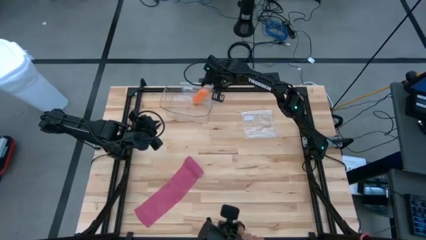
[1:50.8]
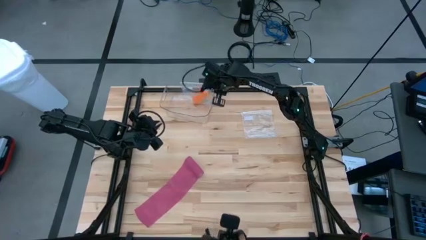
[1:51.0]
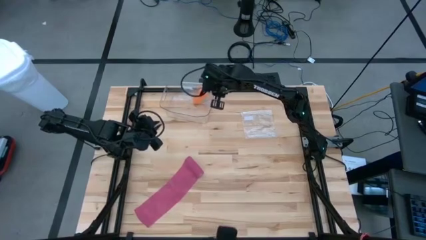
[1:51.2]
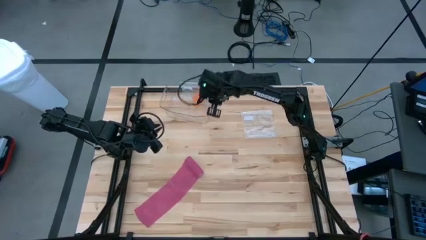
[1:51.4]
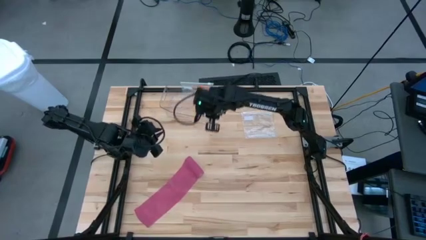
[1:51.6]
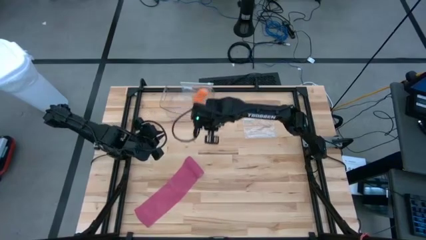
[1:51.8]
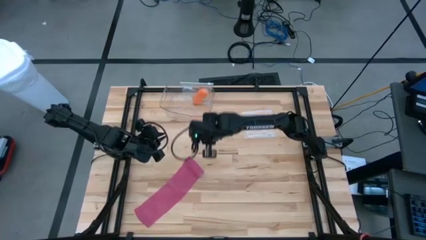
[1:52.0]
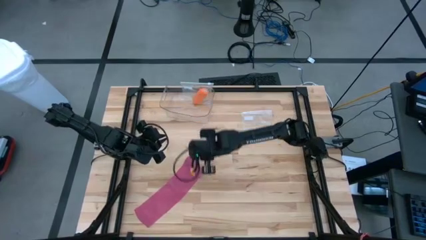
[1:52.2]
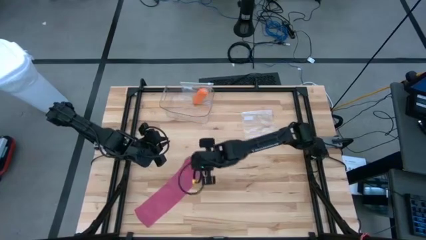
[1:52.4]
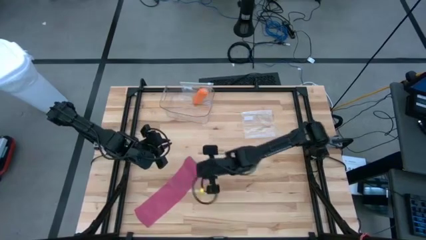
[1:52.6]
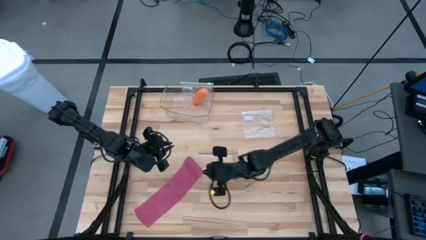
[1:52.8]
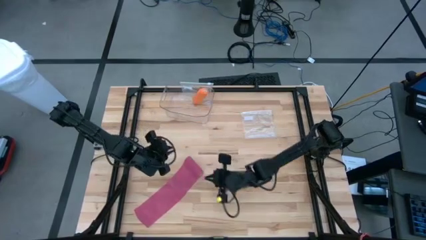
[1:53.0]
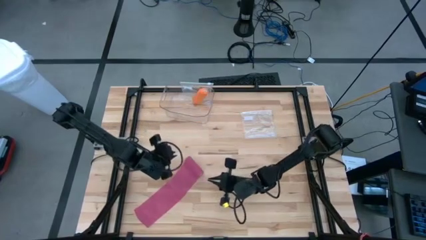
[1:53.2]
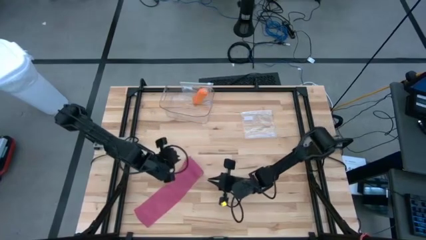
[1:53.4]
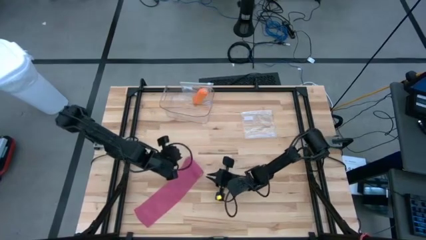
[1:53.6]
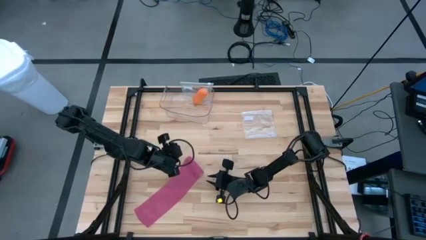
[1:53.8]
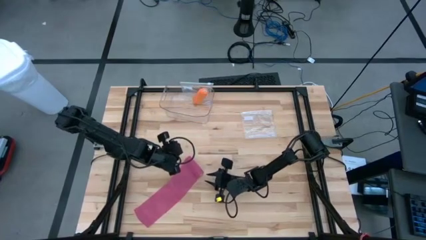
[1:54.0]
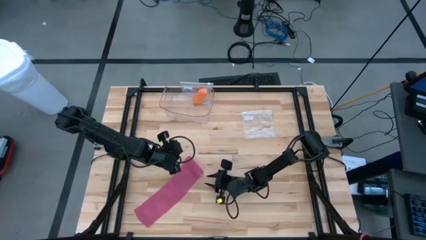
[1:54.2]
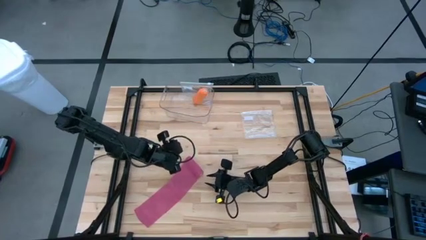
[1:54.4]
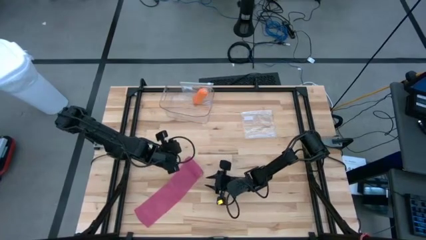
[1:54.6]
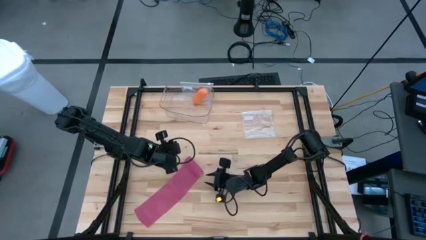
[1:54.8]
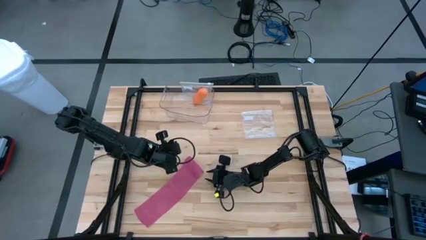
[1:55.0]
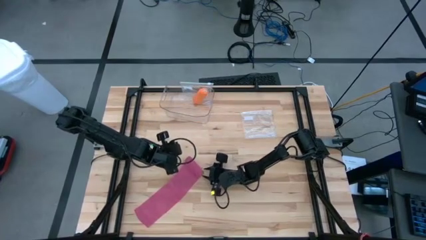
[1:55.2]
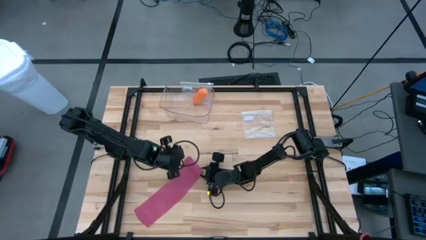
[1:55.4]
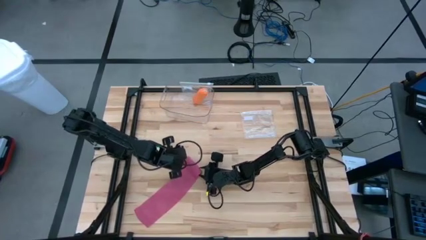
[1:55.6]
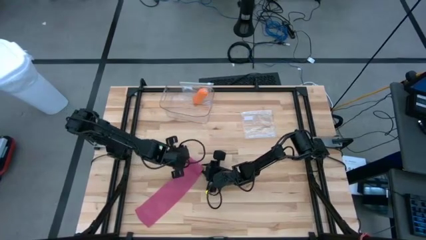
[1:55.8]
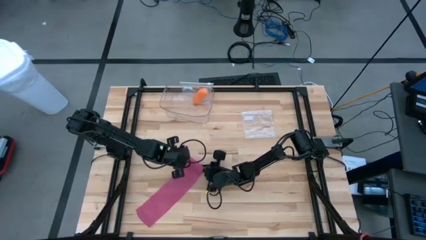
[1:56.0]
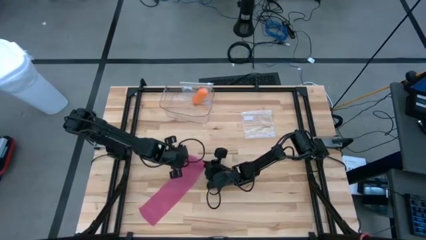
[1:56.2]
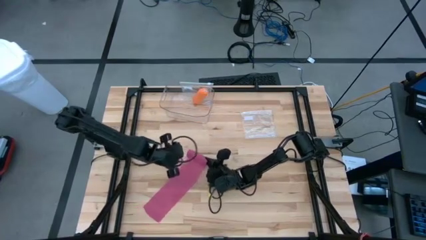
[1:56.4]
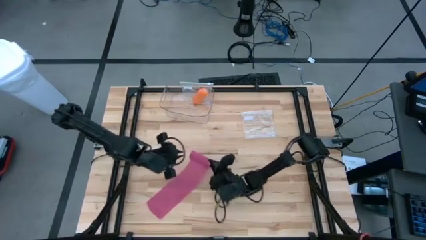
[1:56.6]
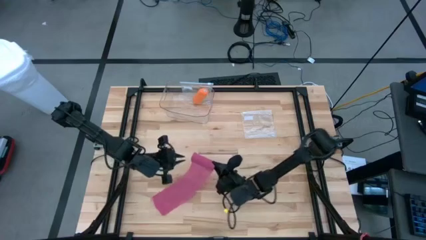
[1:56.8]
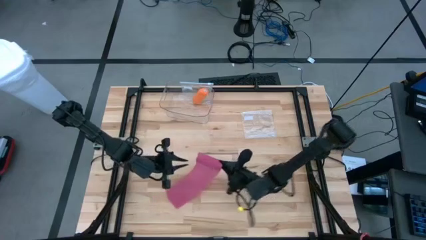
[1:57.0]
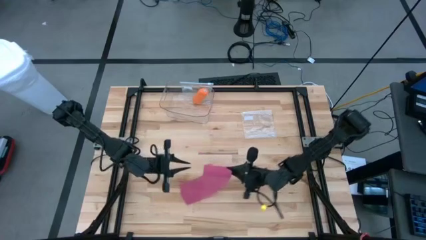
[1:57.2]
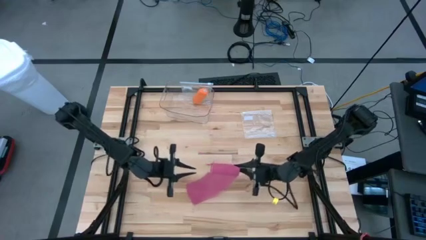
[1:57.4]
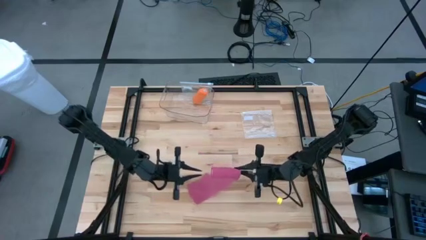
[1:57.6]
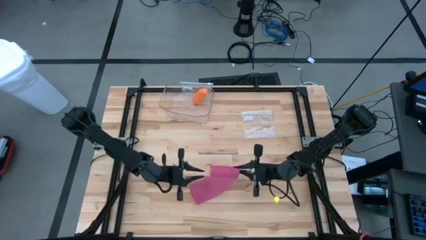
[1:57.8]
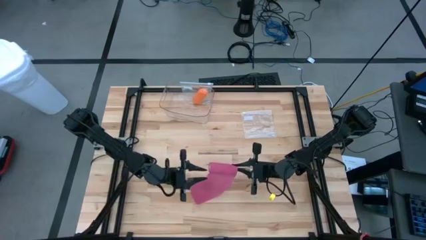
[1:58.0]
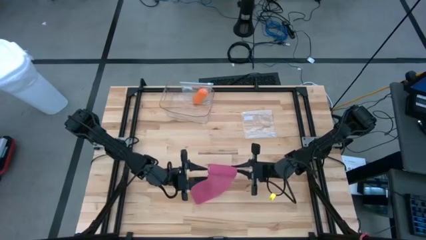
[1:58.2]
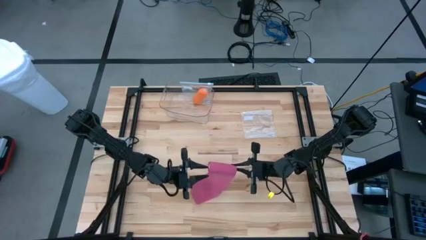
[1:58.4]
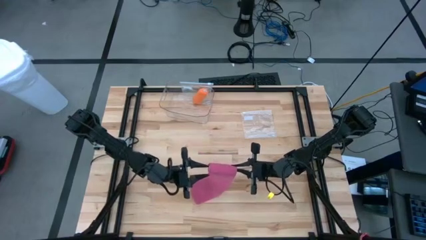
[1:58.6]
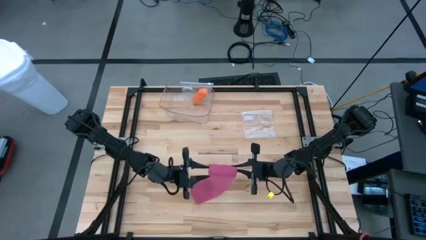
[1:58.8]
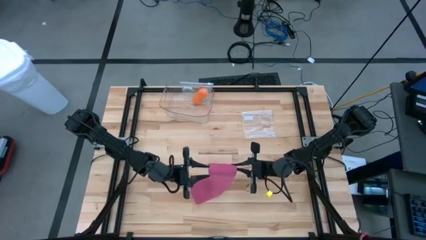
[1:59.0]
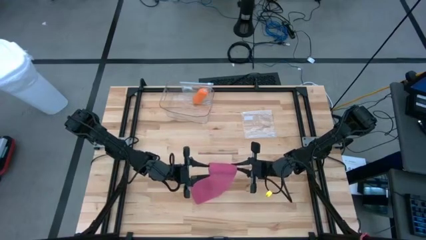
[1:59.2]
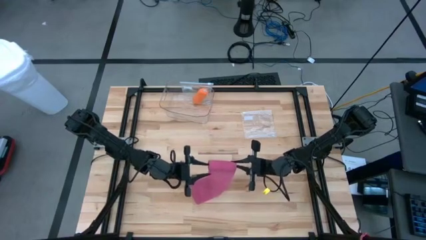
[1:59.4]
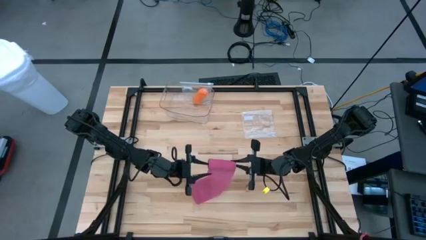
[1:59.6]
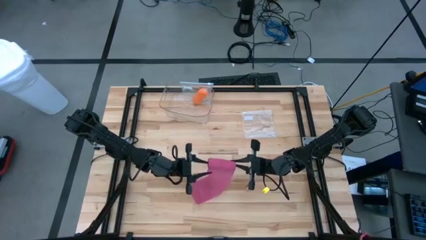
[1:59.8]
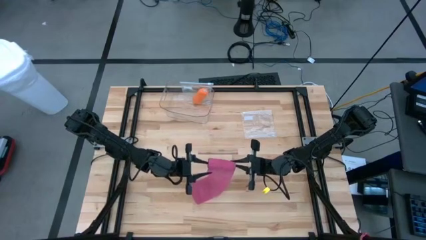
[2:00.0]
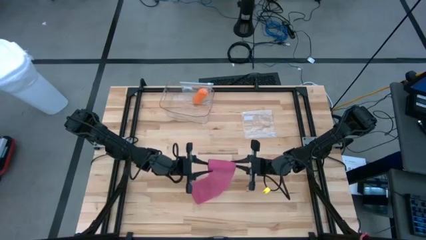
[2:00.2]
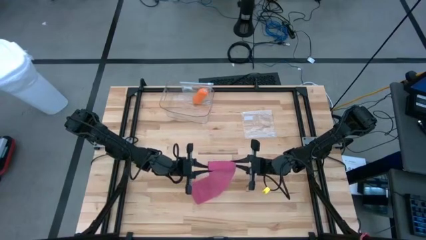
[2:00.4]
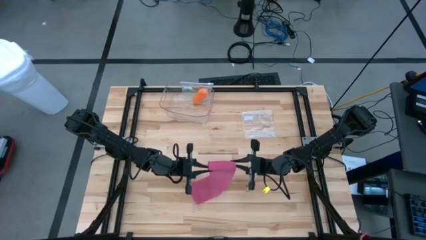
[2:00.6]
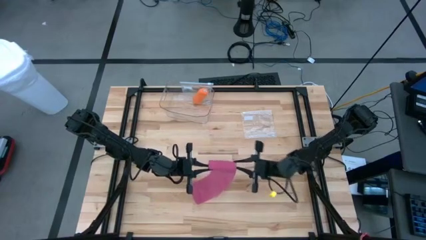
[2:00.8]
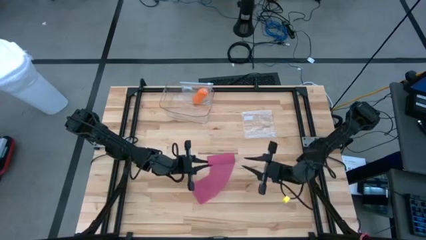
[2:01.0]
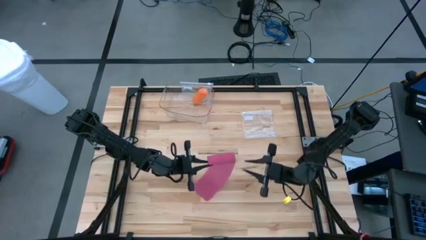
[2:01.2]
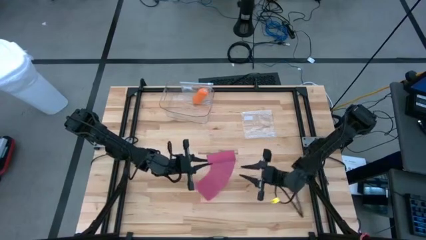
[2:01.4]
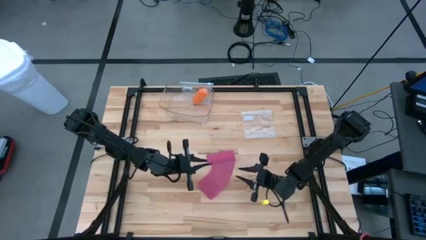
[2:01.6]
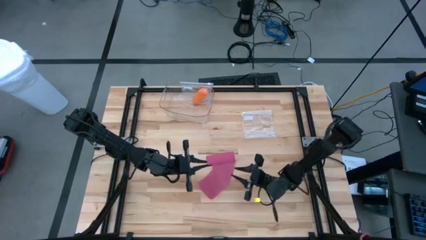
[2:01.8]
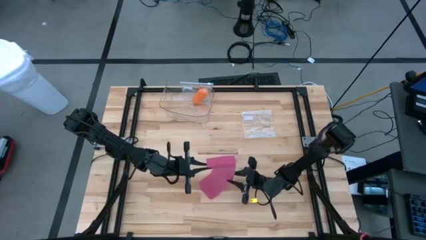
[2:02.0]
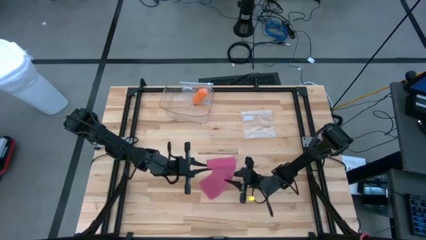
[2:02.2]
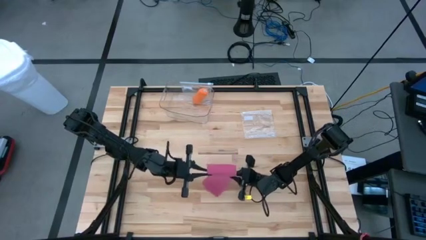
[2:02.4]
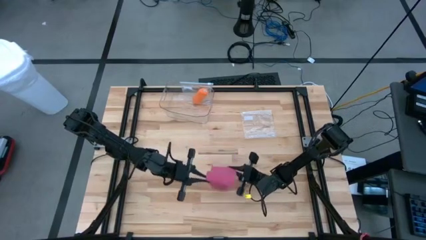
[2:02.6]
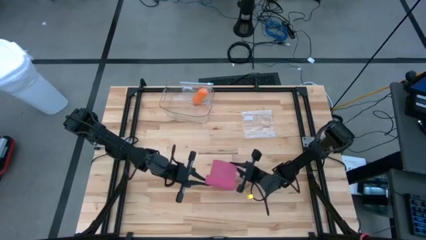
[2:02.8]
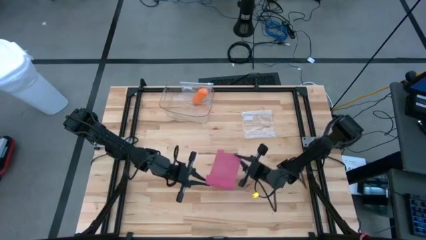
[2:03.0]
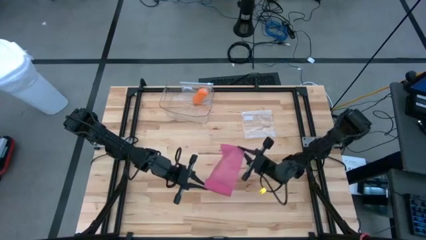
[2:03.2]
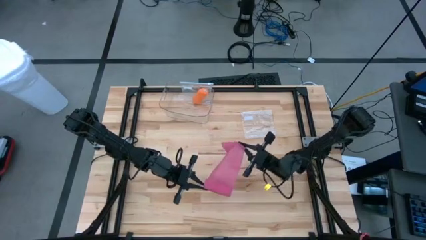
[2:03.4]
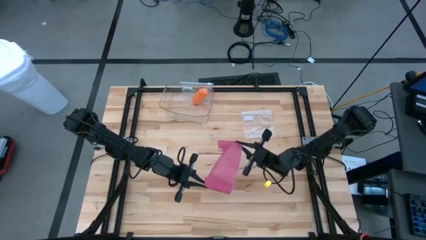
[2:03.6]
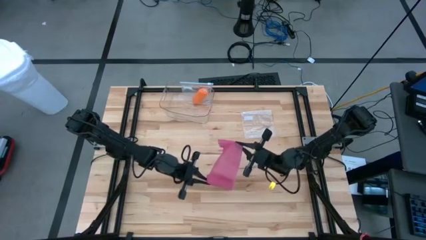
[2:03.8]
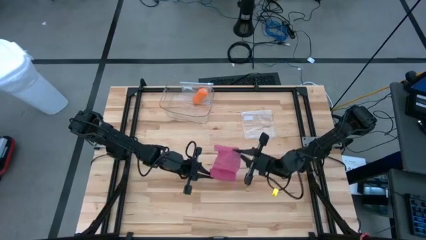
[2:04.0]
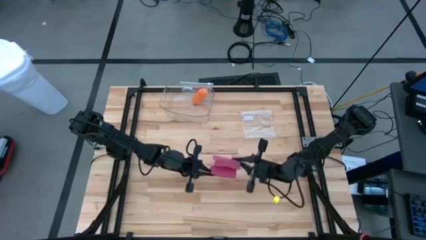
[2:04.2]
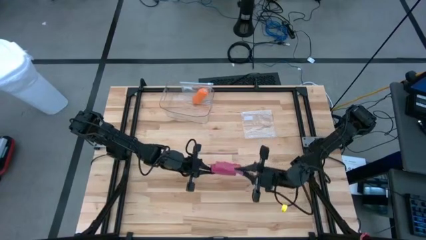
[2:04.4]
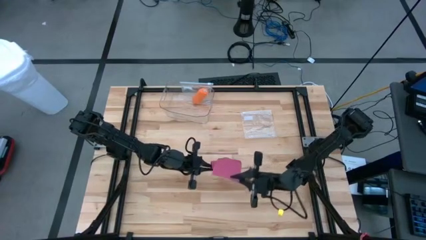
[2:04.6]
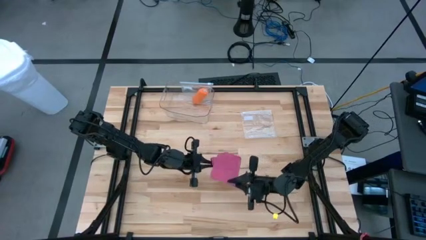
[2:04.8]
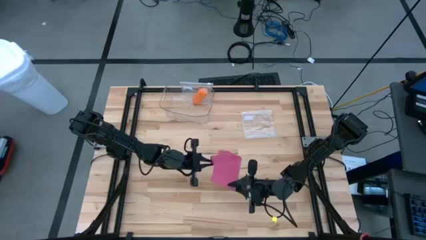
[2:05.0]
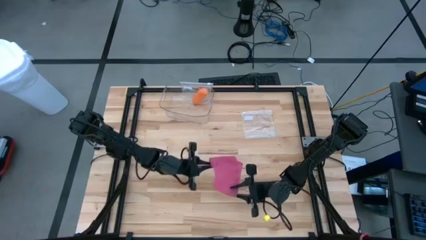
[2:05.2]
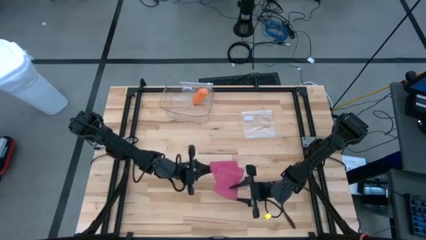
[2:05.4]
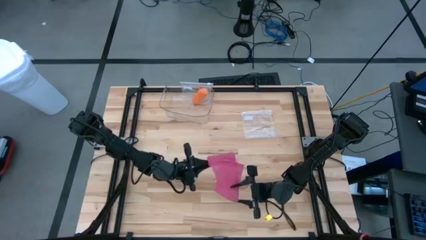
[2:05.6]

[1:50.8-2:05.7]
Task: Roll bandage
Roll the pink bandage
